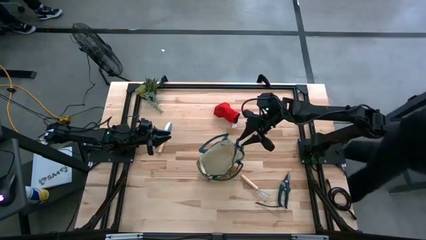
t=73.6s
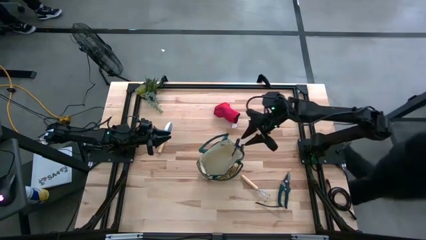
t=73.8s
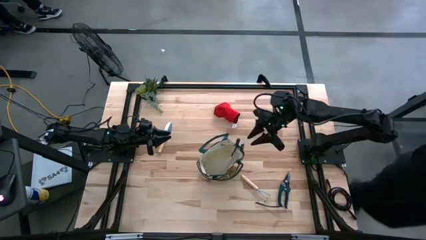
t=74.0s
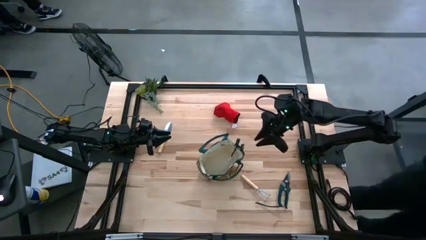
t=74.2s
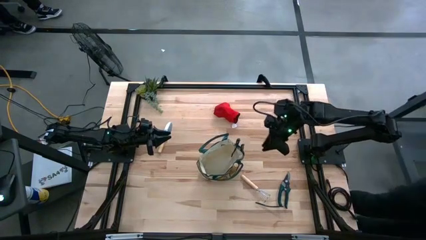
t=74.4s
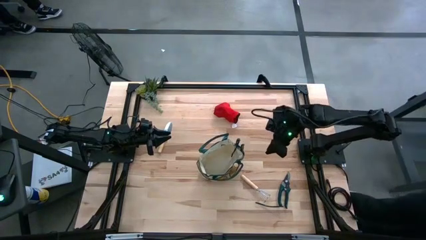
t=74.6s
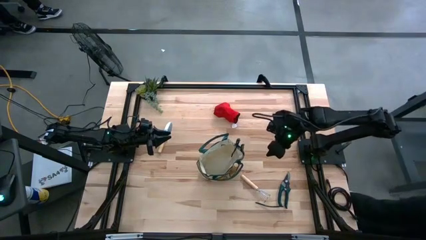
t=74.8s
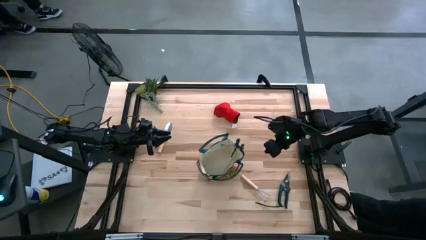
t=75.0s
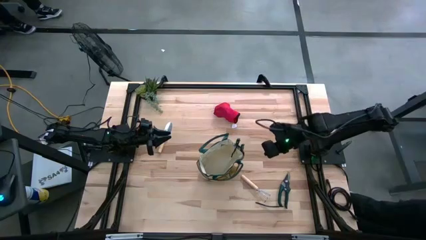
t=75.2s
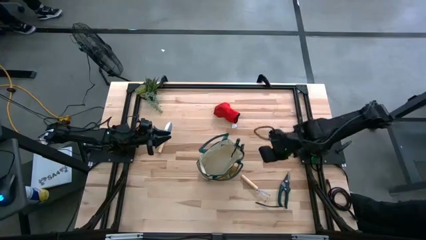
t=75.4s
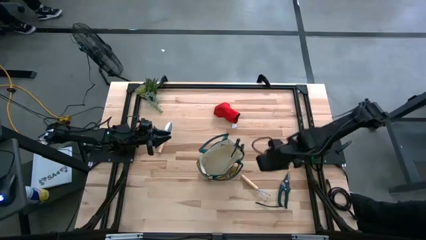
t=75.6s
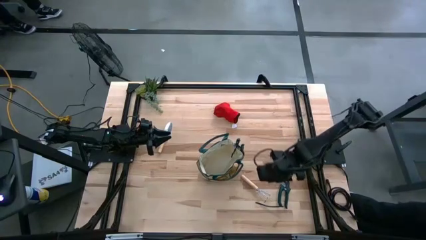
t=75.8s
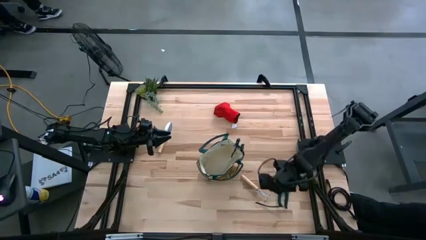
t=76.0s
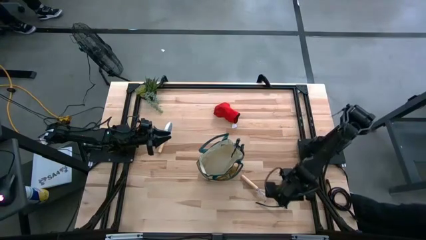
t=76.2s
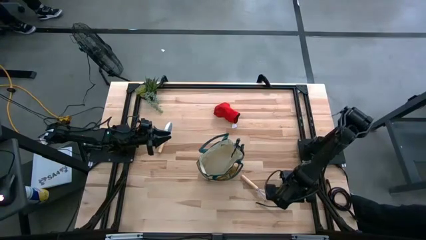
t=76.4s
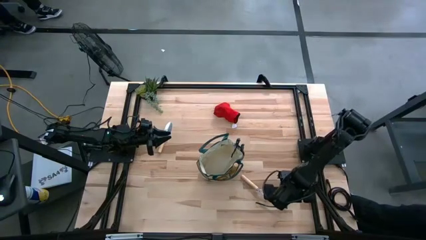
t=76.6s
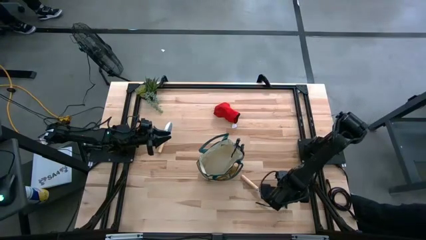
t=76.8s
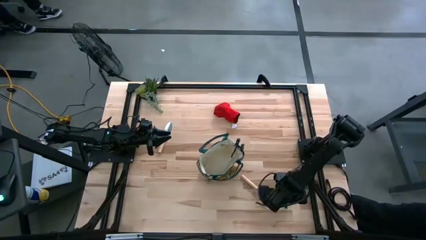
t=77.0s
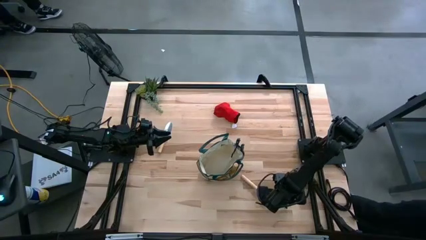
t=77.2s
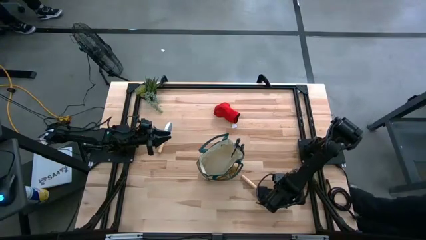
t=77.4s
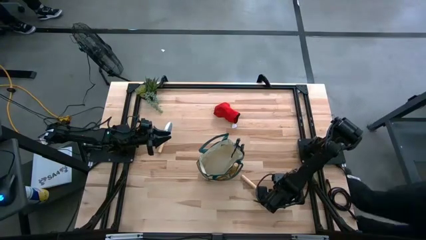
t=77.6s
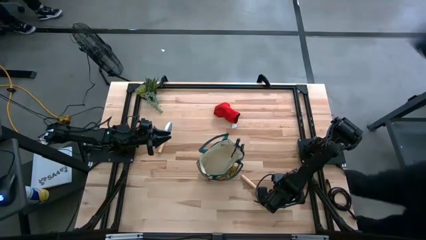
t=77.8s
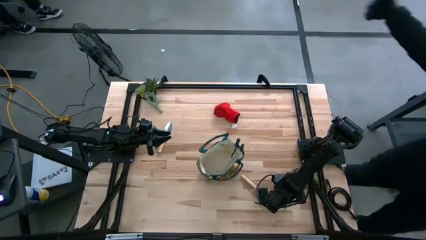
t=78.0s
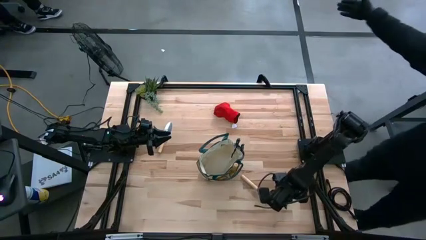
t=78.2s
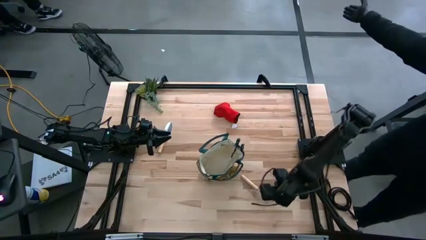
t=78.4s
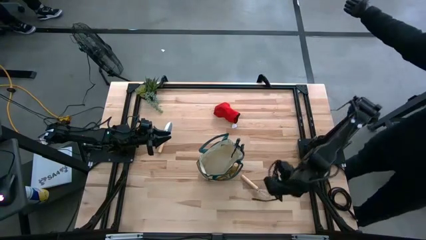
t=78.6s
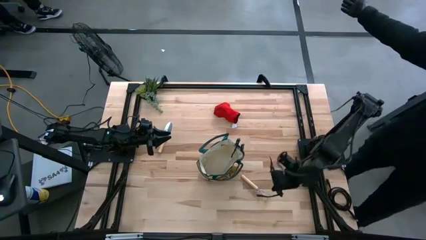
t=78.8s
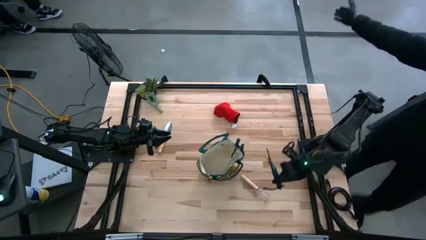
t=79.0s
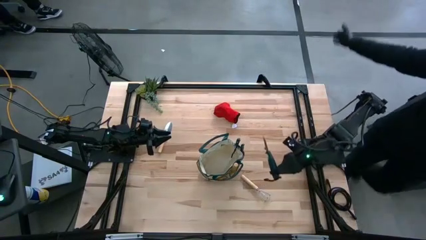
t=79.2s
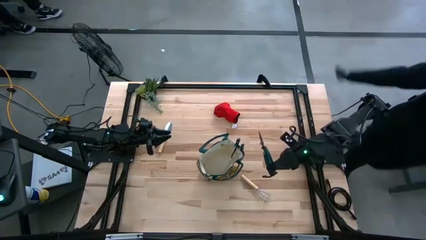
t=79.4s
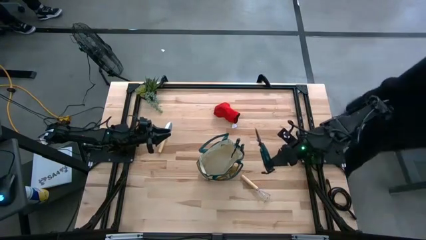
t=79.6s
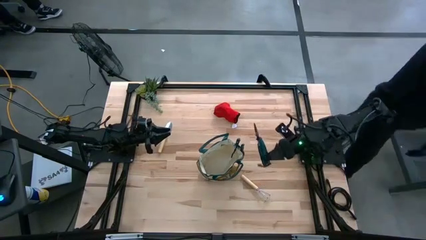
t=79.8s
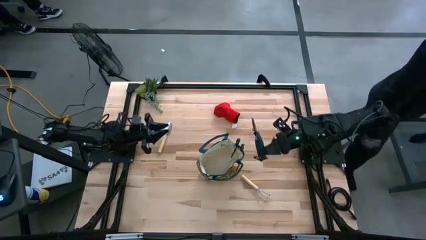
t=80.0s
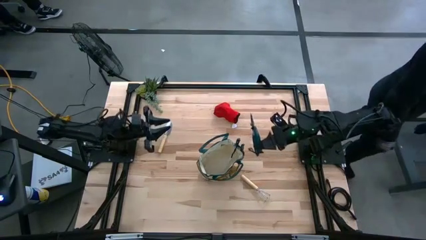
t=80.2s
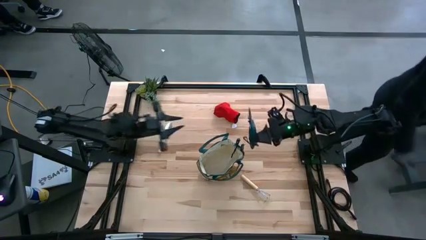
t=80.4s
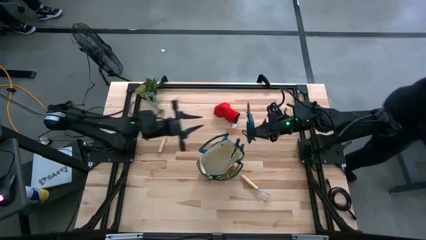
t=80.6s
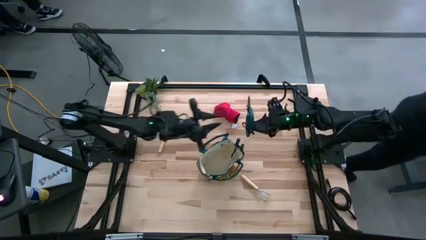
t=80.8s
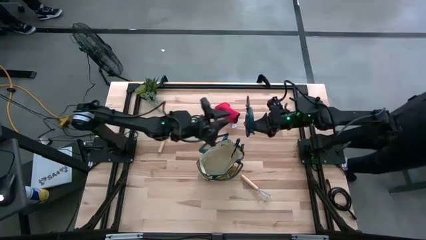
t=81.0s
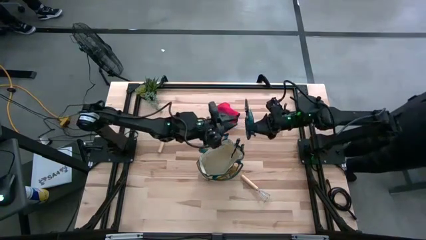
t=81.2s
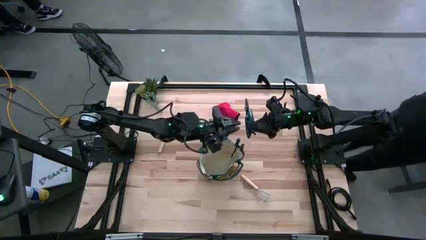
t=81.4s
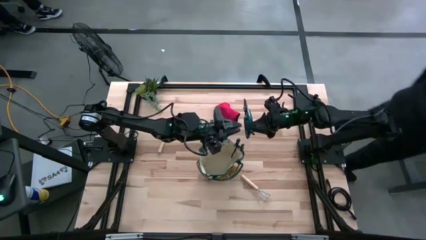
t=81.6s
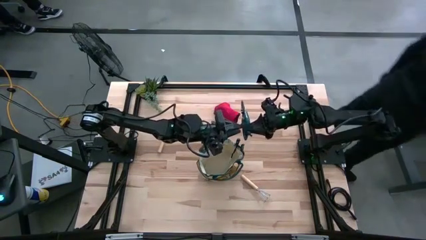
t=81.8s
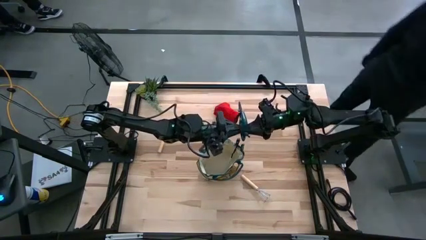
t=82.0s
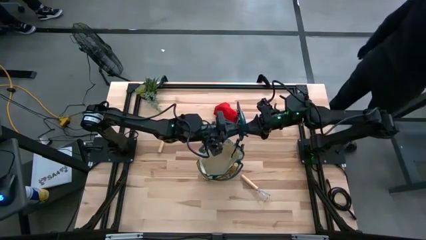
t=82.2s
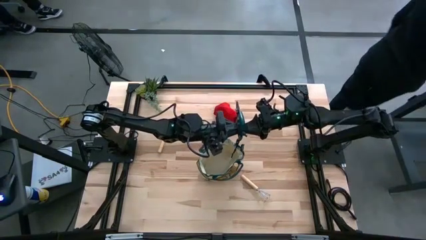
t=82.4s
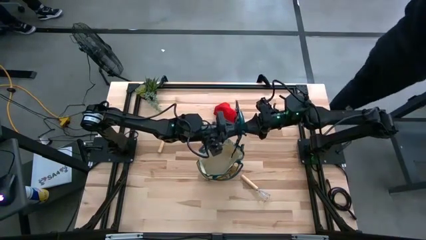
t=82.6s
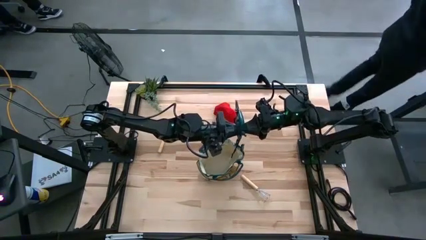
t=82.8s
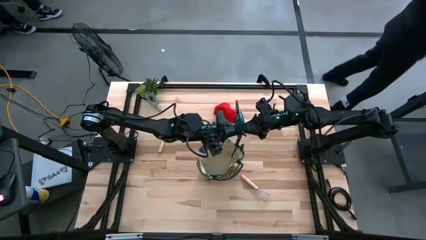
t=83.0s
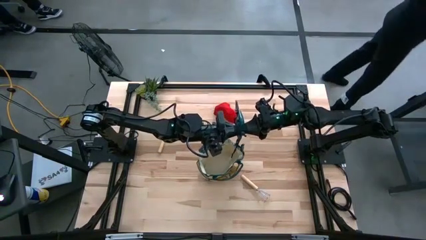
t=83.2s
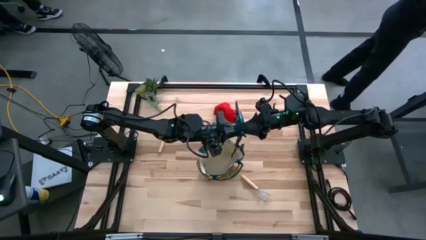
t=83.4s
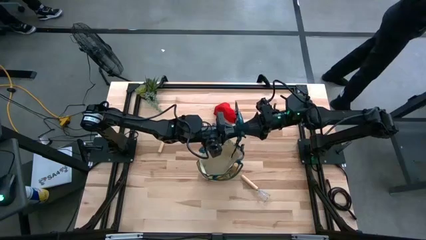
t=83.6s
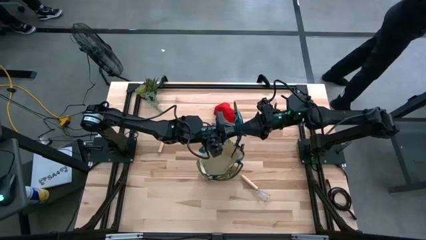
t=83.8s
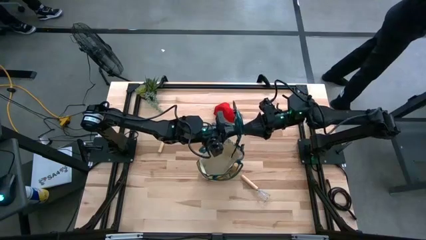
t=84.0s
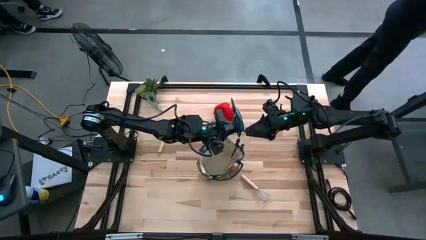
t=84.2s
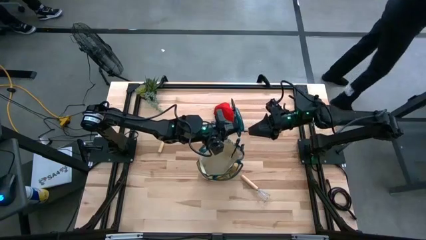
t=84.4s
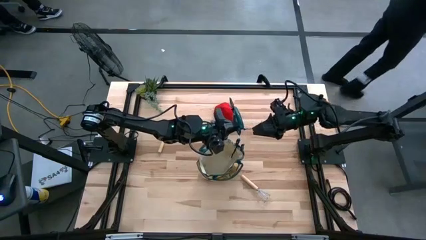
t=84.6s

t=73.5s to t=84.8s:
Task: Pick & Place Garden tools in Gardening bag
Put the green shear scissors into the white gardening bag
